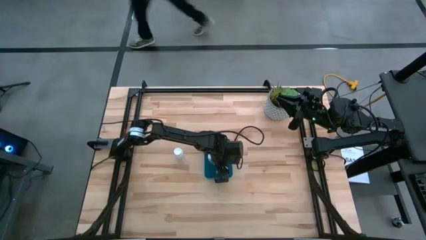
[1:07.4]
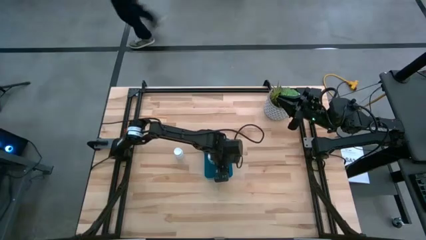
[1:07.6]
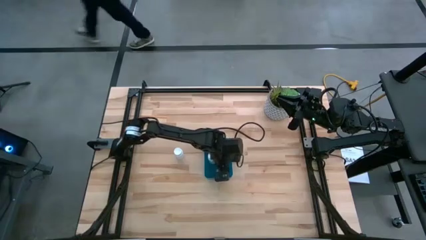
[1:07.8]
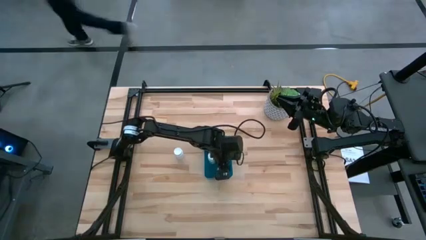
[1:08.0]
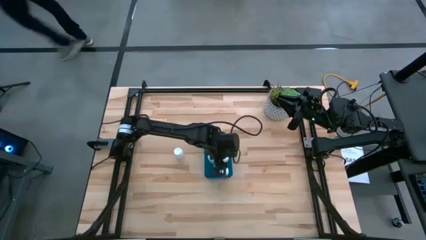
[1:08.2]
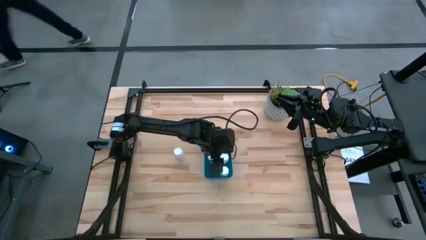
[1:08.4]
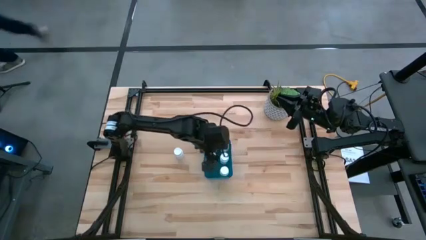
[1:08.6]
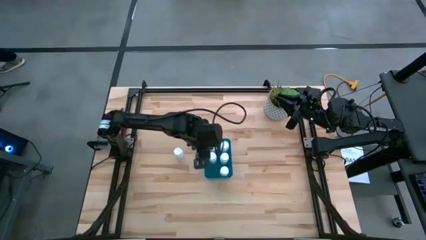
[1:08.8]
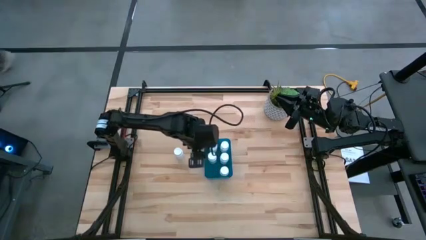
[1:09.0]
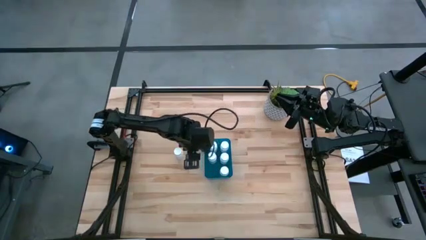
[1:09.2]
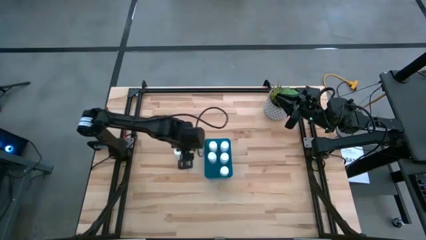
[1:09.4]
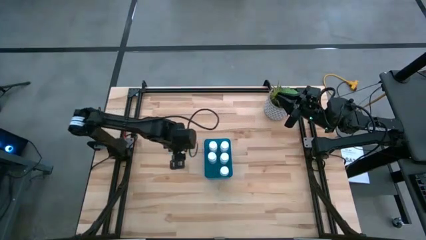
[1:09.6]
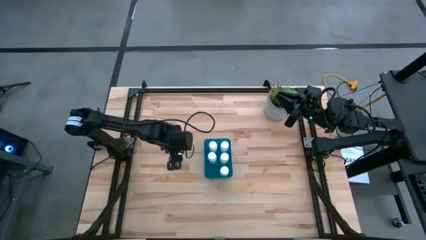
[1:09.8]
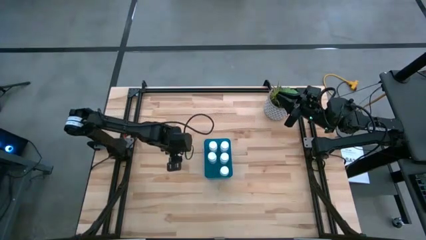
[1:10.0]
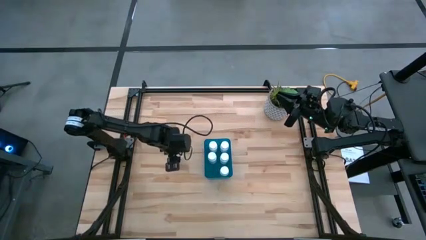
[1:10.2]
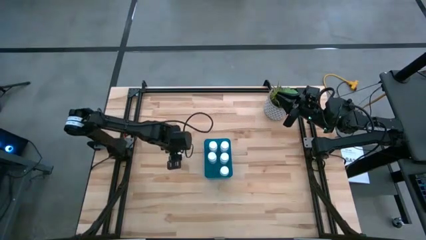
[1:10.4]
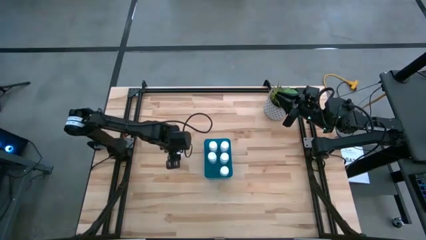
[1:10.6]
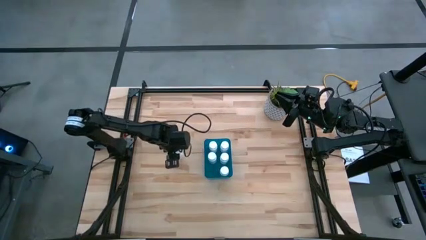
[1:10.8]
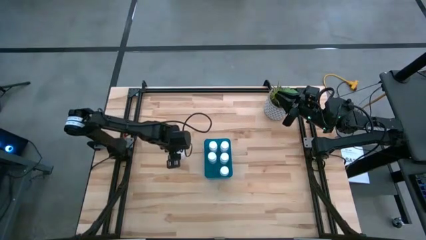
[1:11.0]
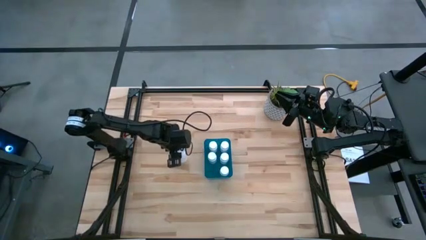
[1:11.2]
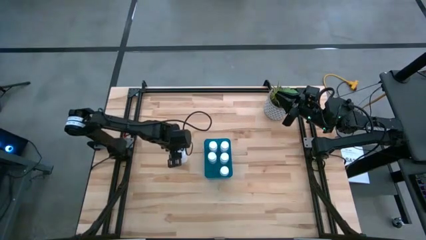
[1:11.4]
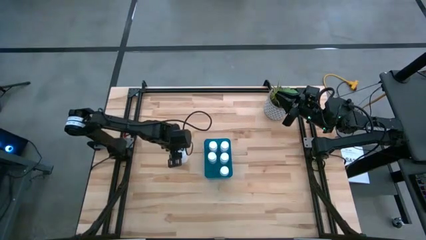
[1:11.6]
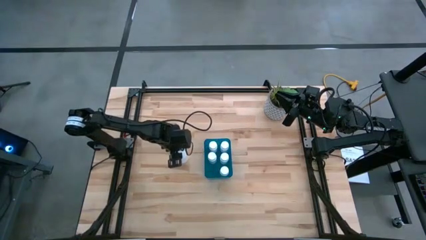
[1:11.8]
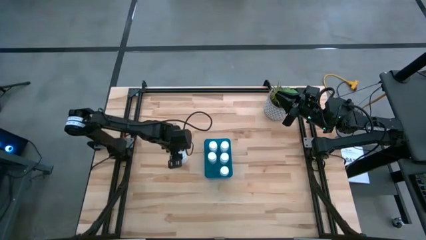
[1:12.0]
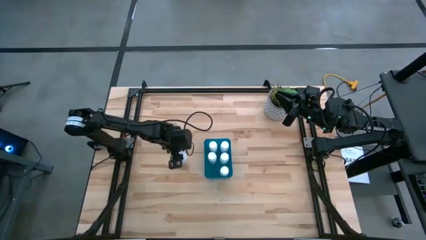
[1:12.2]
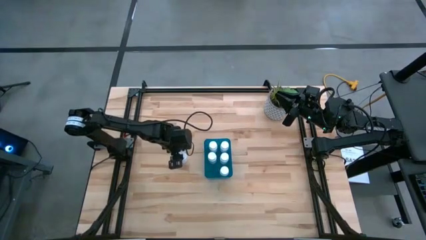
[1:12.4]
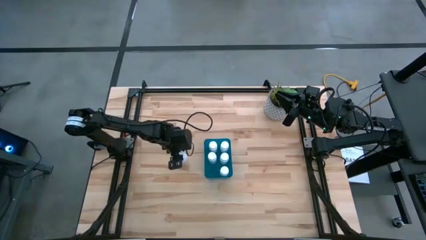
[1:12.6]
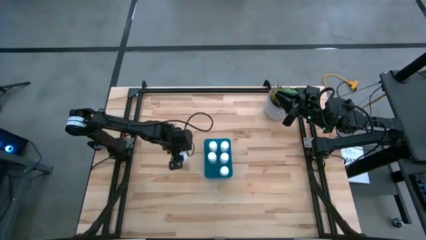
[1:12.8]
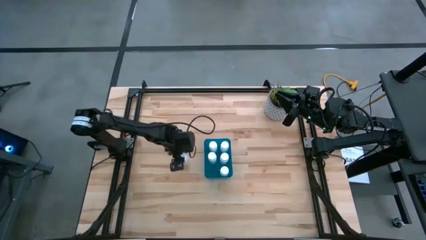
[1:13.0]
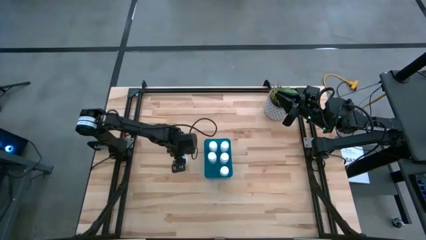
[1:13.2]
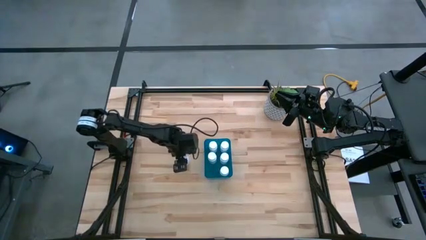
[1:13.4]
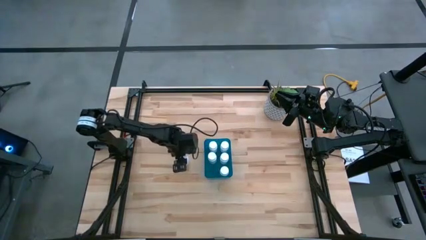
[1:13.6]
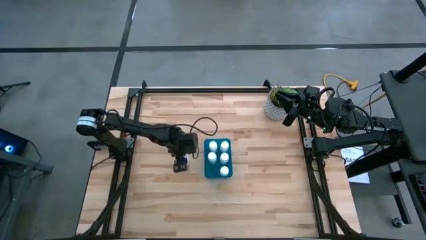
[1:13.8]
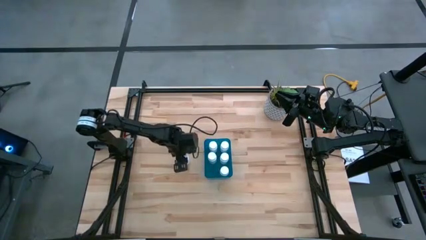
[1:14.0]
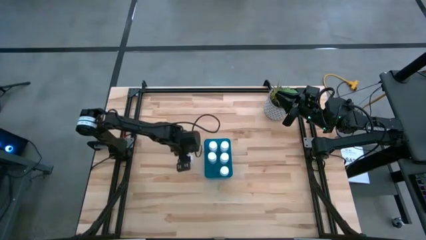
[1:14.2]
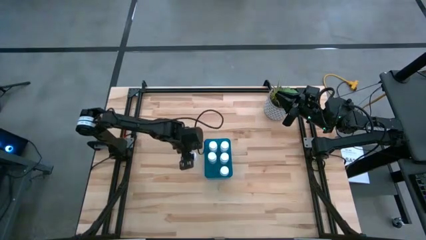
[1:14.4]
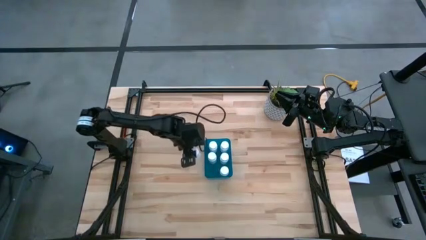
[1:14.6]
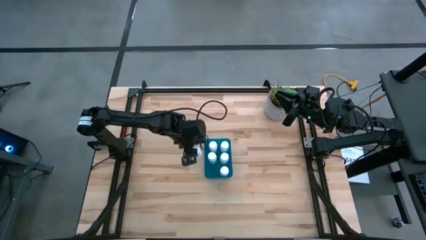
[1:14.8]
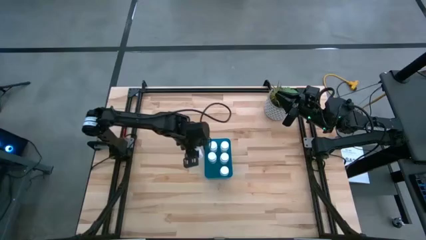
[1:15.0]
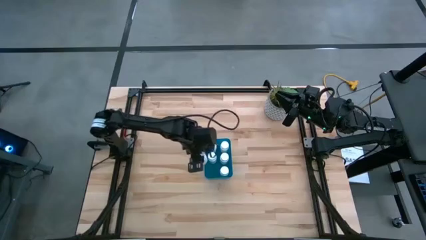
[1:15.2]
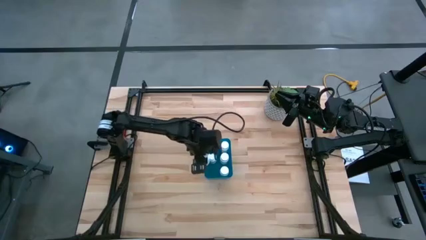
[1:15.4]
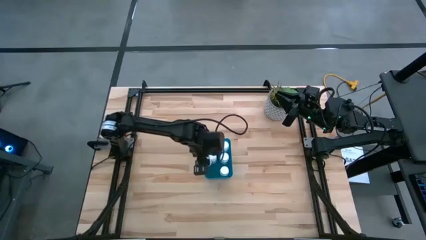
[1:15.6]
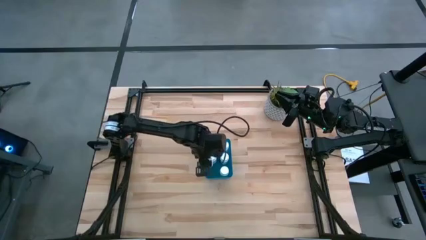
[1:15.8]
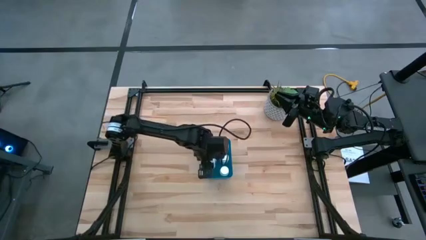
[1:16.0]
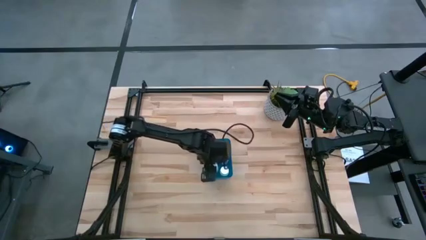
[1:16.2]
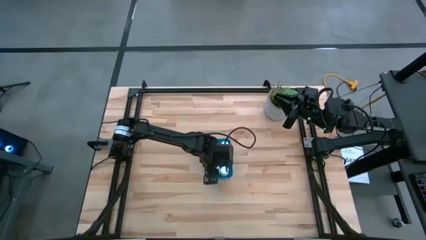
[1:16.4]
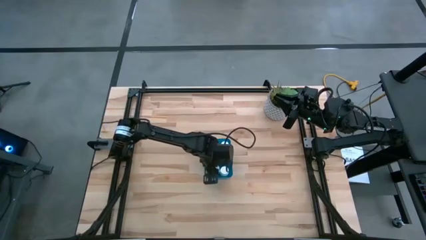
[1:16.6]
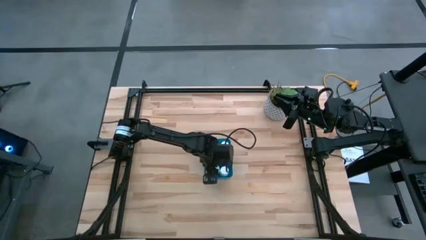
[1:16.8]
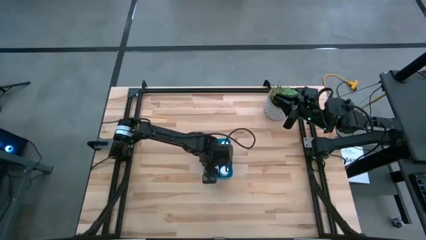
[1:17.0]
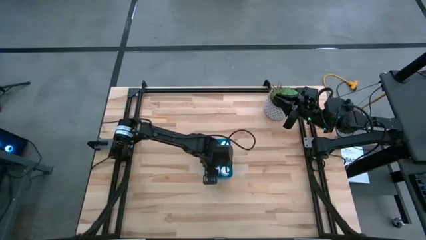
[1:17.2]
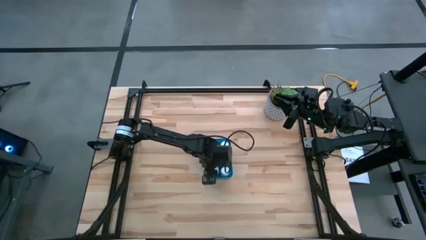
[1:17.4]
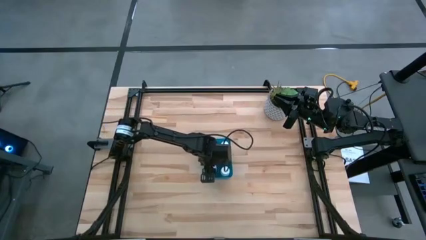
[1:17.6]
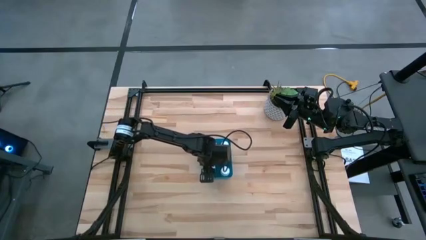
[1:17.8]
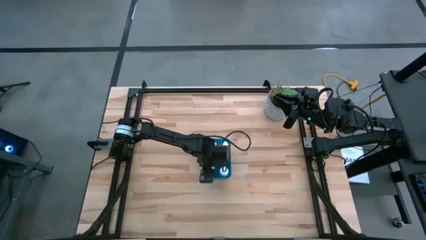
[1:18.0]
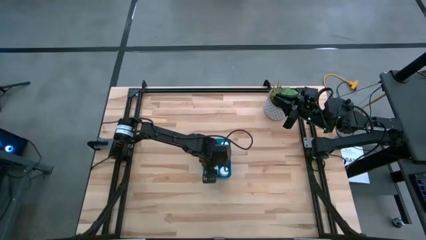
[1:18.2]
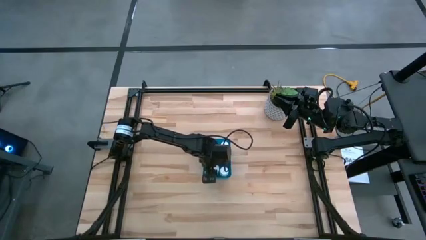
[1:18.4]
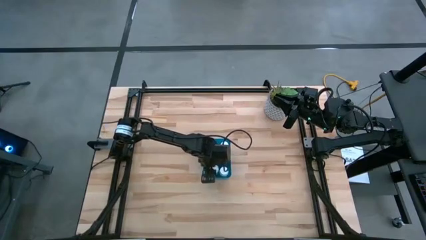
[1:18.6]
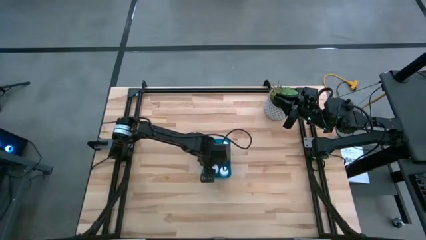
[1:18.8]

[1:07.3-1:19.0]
Task: Pick and place pill bottles into a basket
Put the medicine bottle in the blue bin
